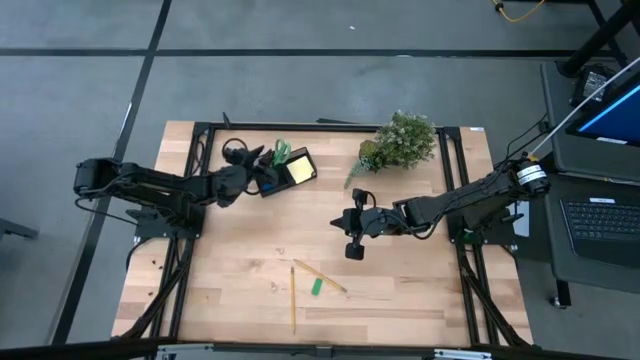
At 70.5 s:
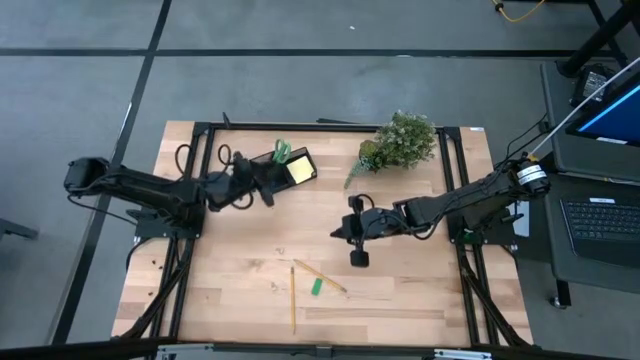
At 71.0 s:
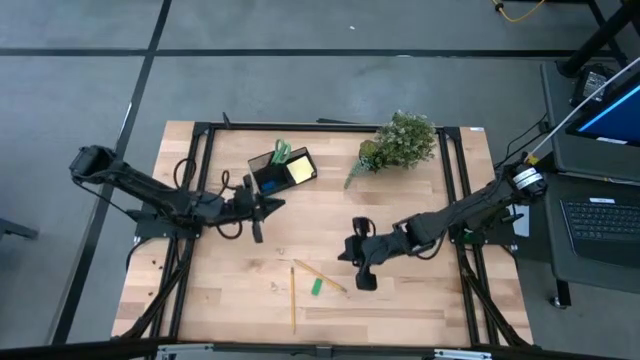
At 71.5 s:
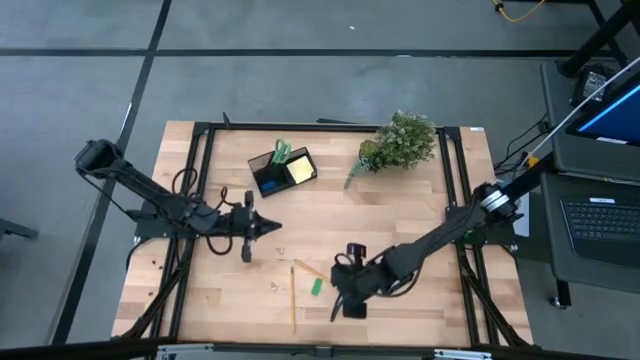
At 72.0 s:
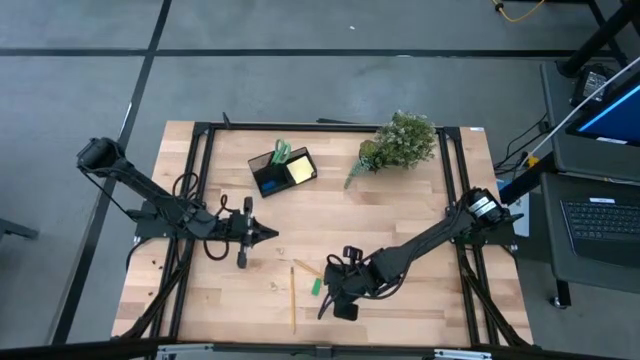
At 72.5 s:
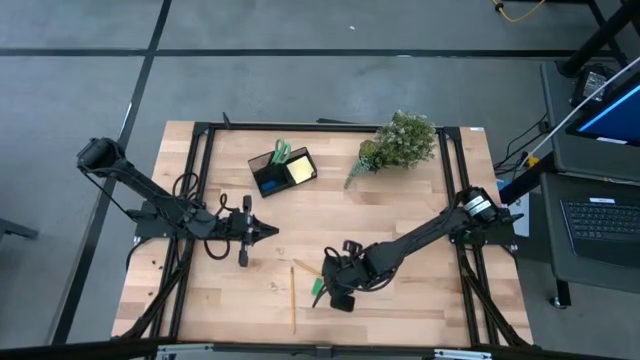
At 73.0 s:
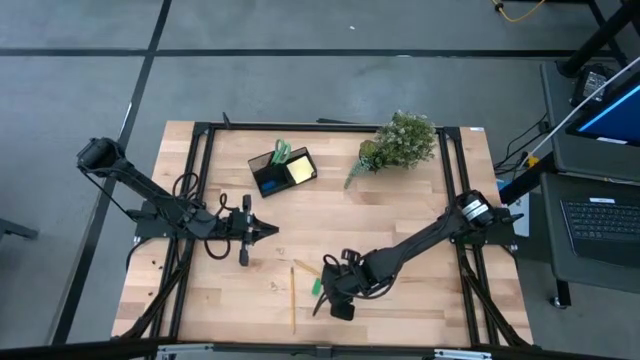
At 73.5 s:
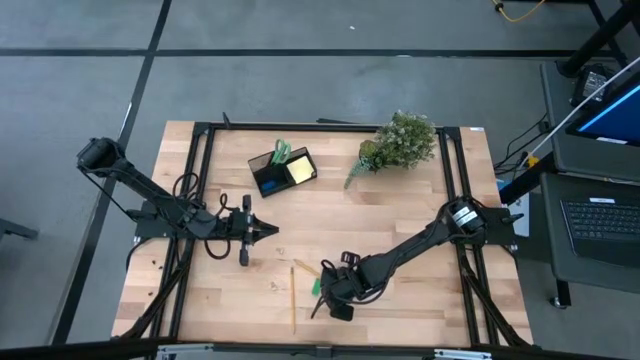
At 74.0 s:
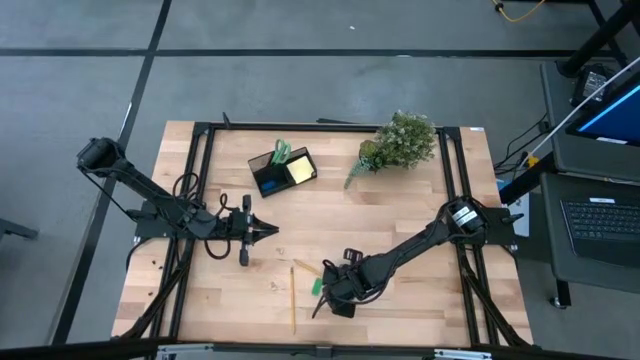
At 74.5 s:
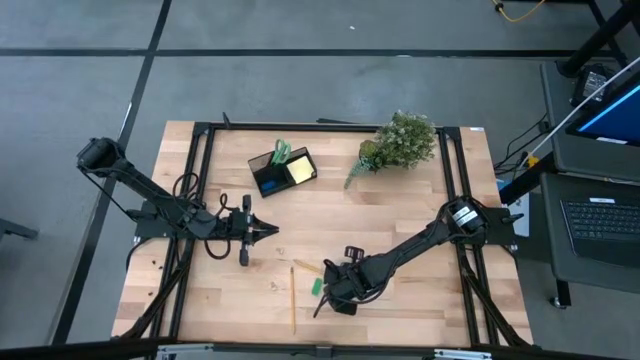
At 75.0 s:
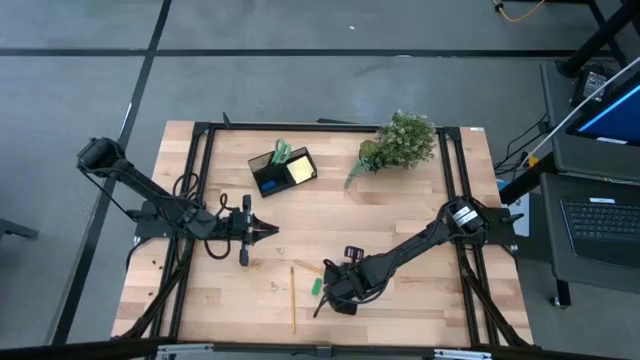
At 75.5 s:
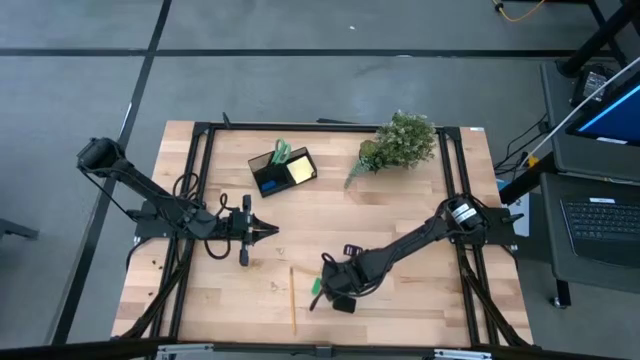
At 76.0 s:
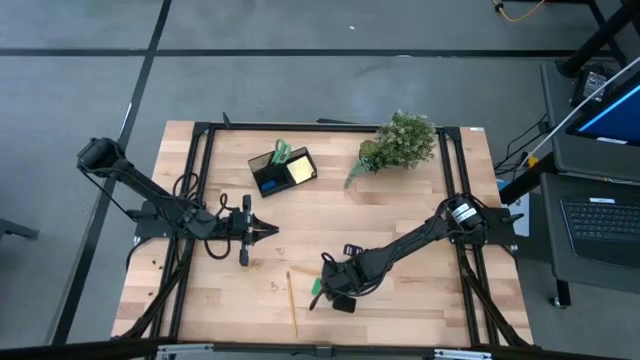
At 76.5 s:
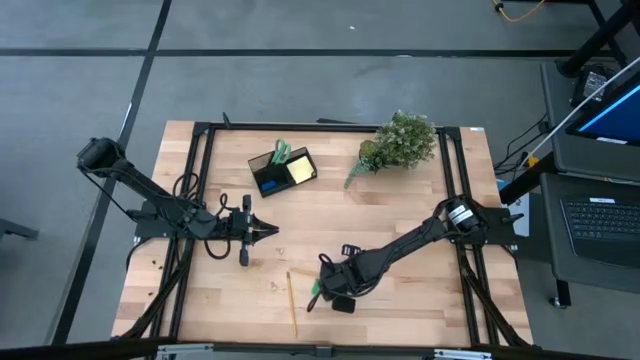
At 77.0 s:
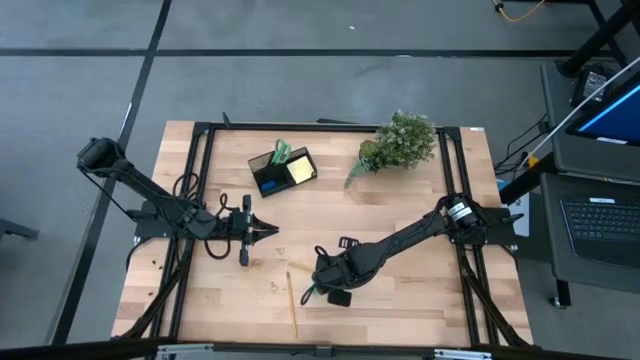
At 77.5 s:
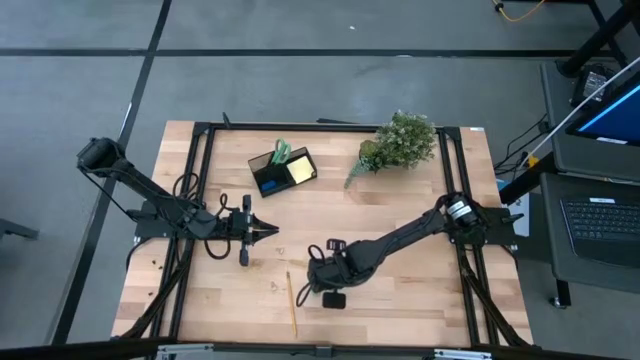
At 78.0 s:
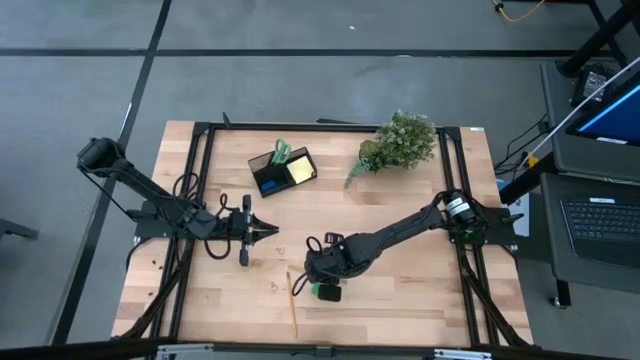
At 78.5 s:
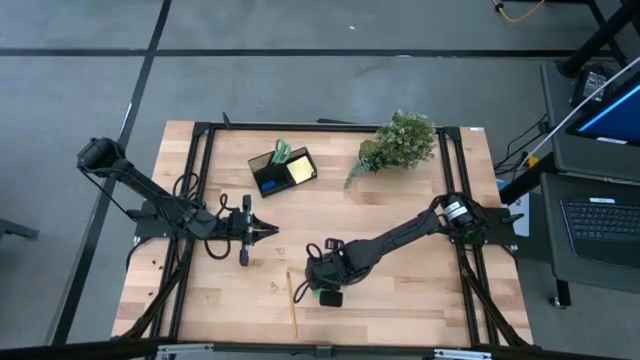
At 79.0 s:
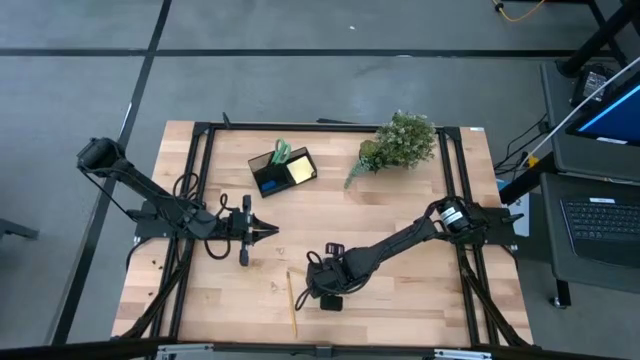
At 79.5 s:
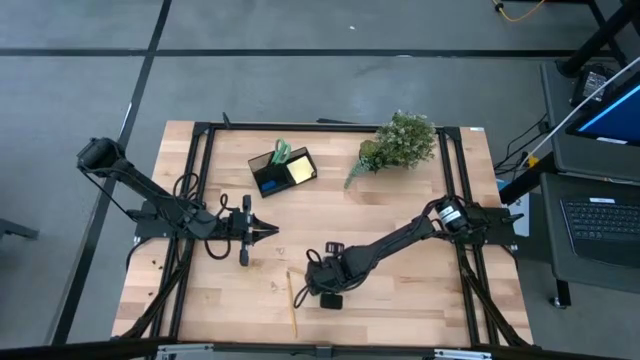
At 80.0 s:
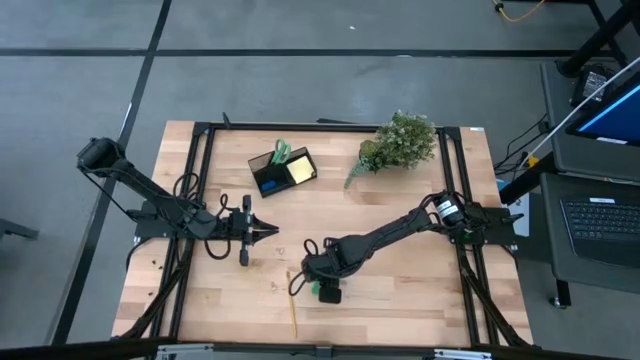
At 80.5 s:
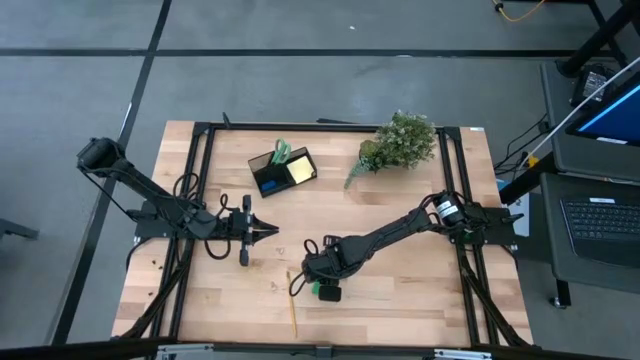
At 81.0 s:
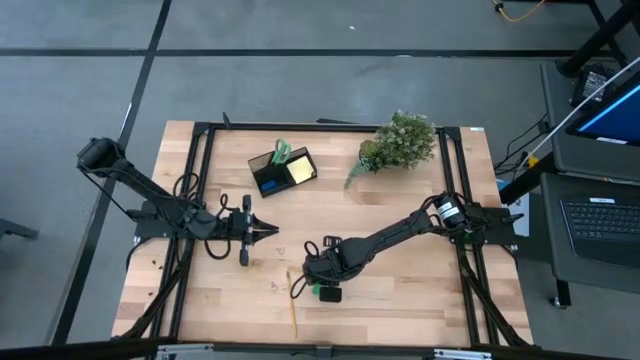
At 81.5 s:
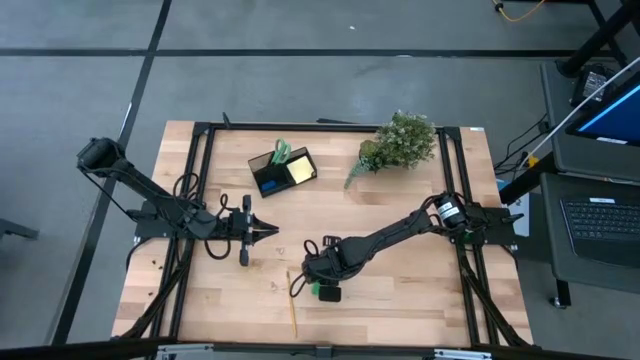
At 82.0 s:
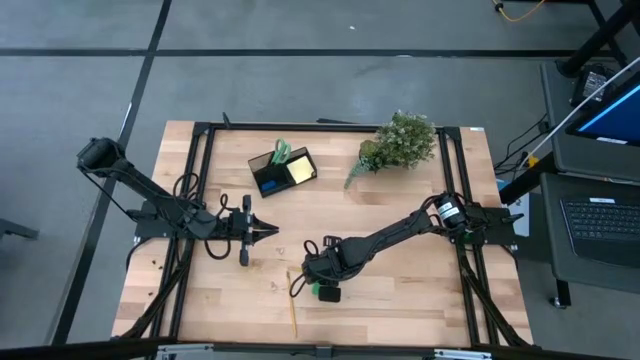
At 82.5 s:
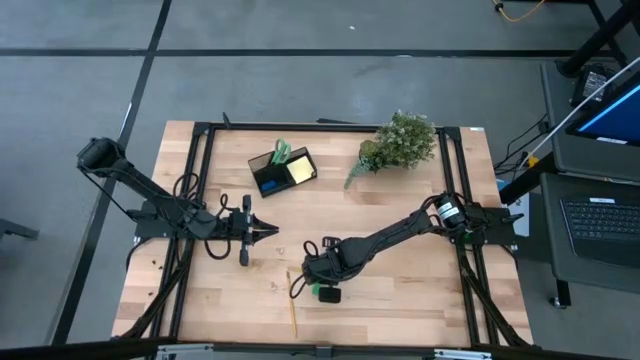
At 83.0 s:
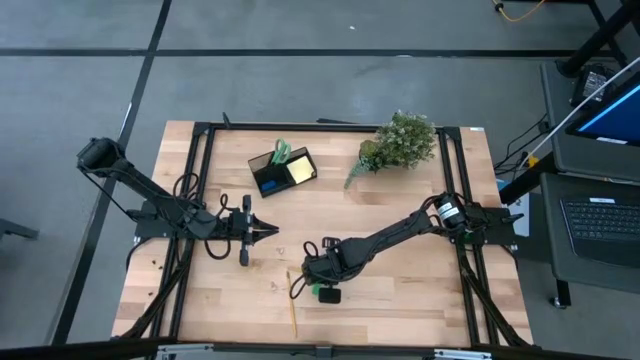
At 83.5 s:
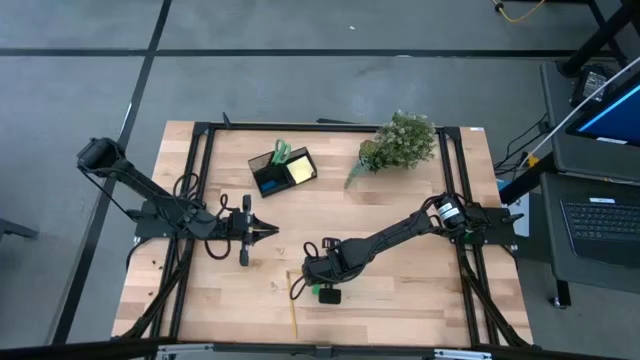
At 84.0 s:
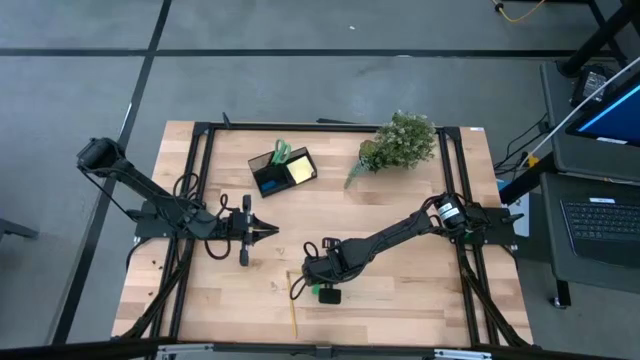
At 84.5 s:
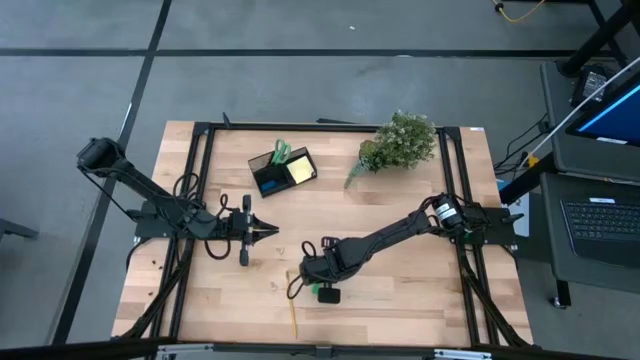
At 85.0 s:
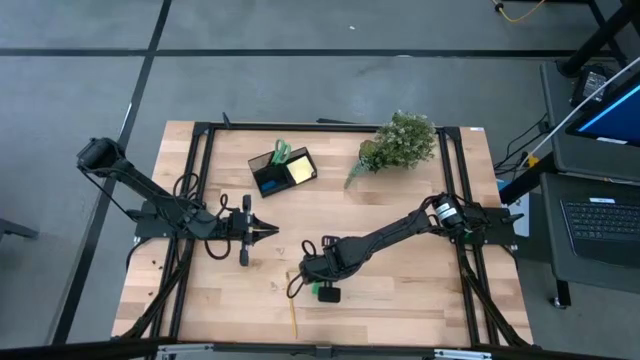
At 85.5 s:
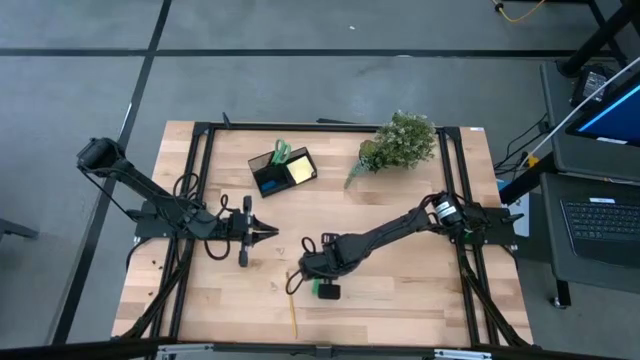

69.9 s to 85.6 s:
Task: Pick and place office supplies into organizer
Put the top yellow pencil into the desk organizer

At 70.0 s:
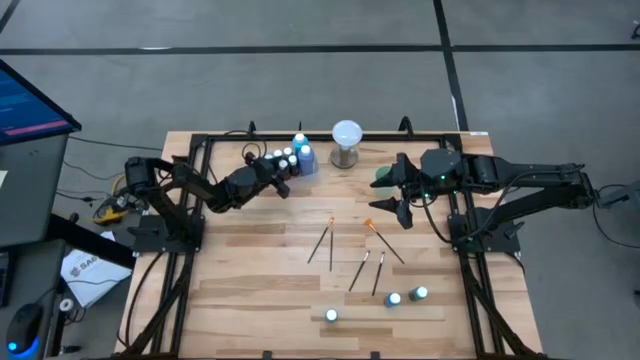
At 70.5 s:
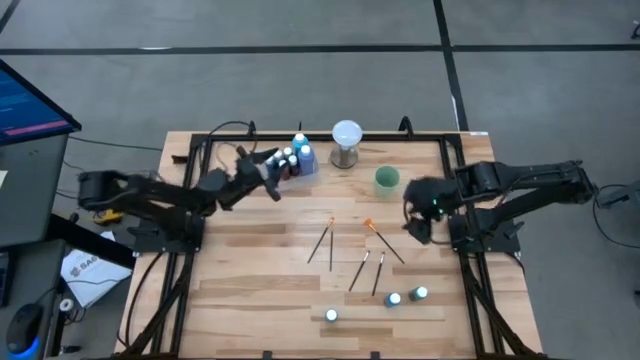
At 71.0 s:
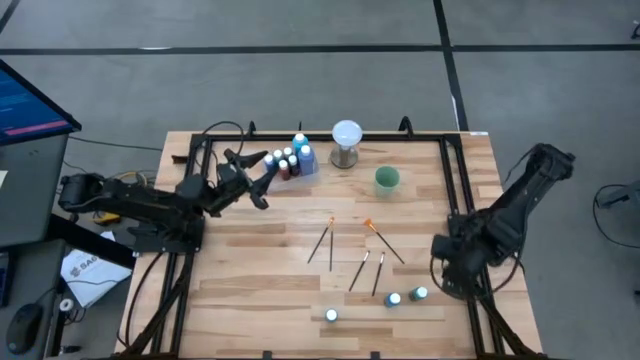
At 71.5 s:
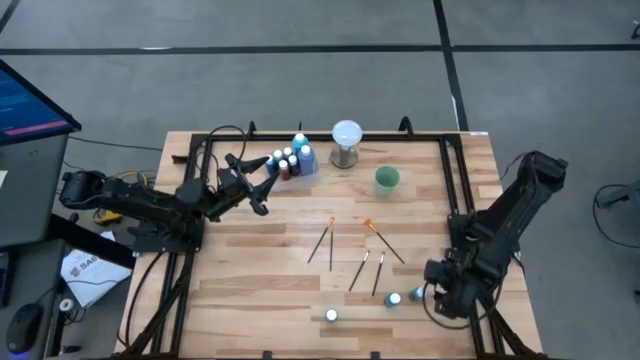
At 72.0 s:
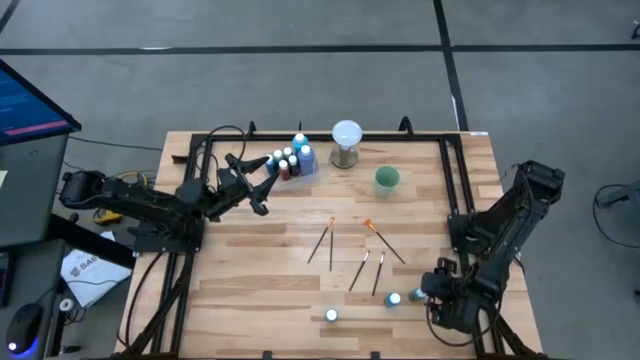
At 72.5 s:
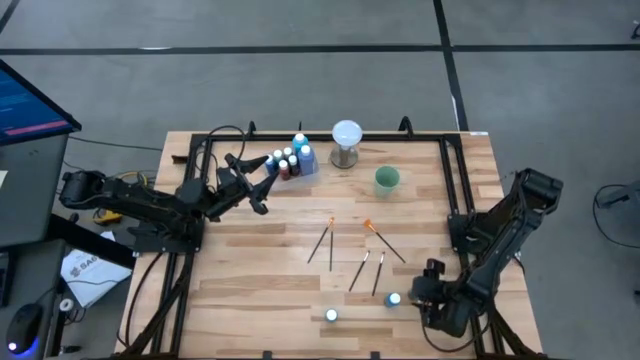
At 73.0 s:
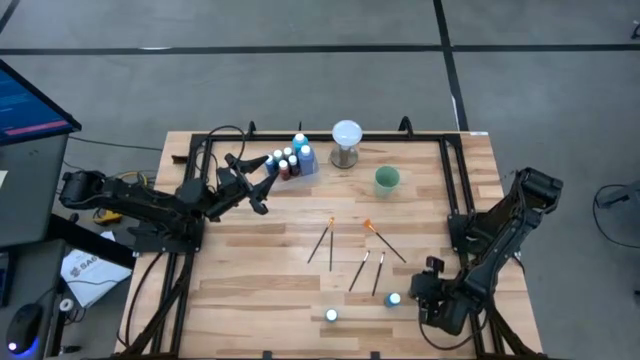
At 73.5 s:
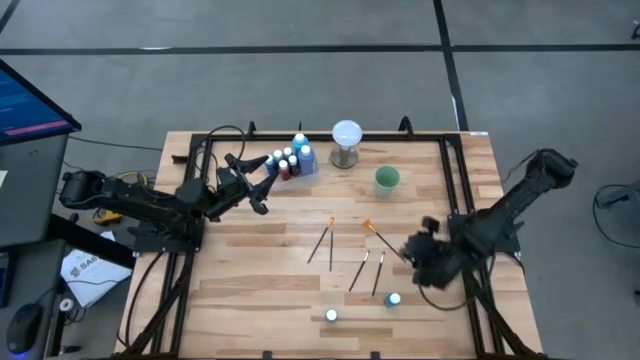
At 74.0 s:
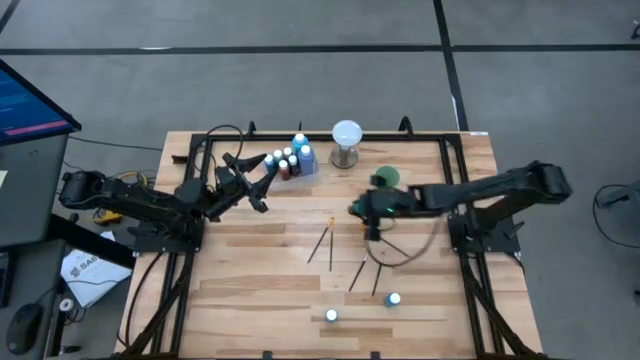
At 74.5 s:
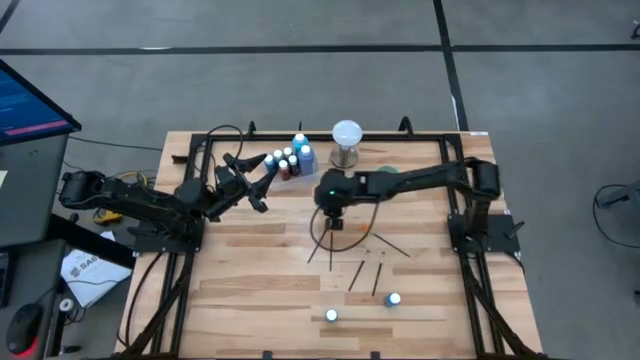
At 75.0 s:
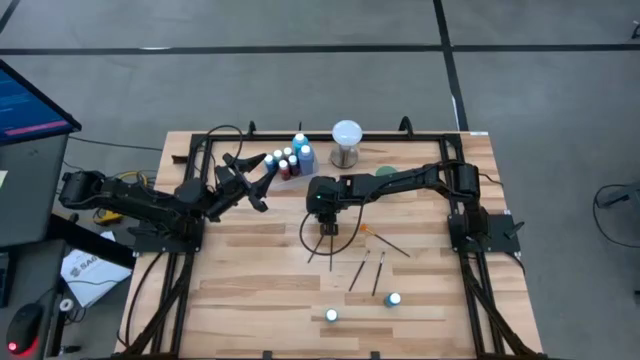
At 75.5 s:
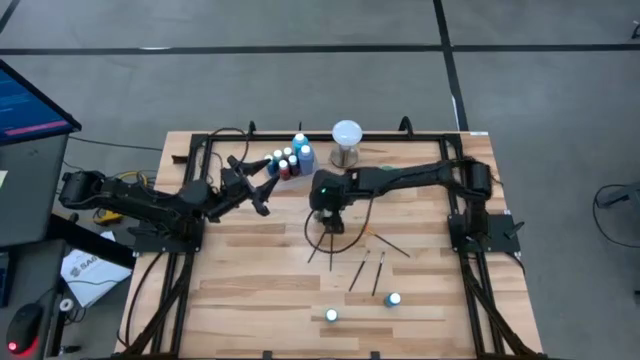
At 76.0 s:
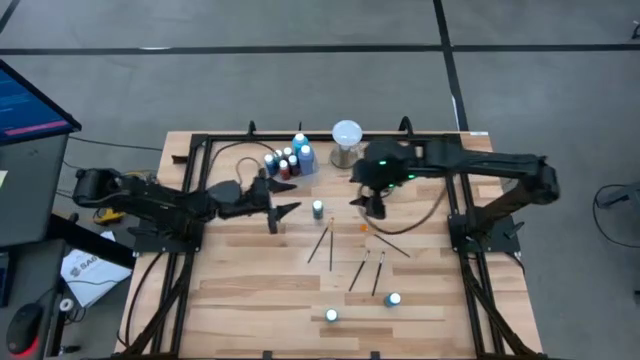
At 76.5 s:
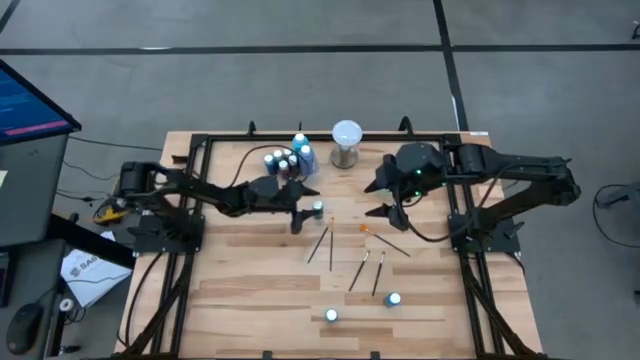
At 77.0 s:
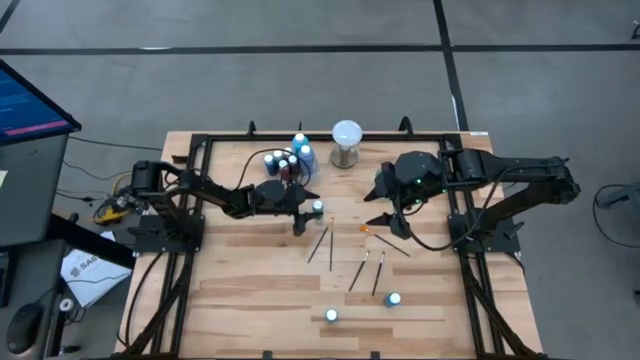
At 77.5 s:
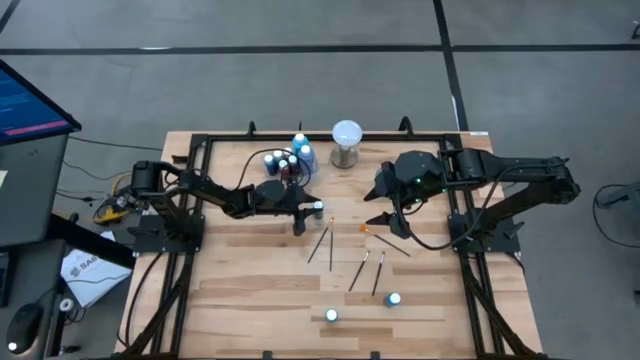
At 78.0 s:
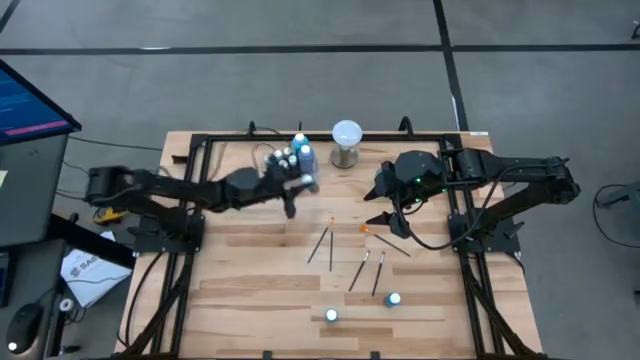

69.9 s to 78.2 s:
Task: Pick & Place Paint Supplies
Put the small dark green paint bottle into the transparent bin
